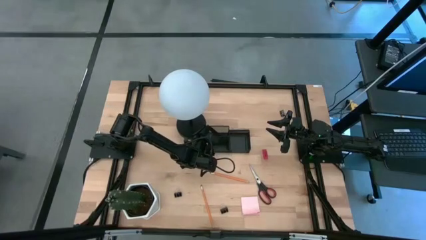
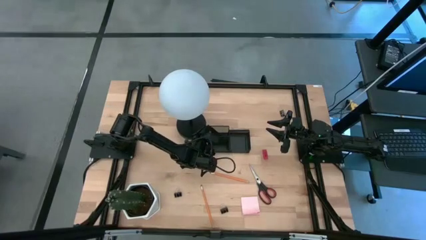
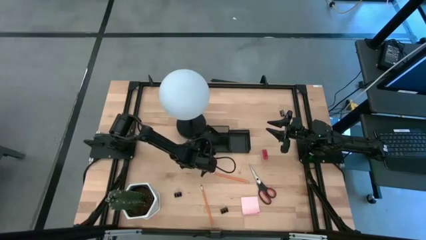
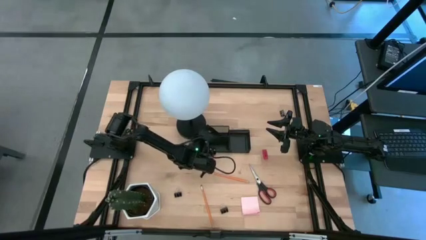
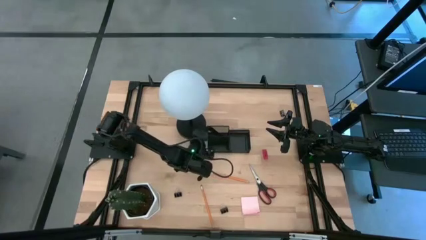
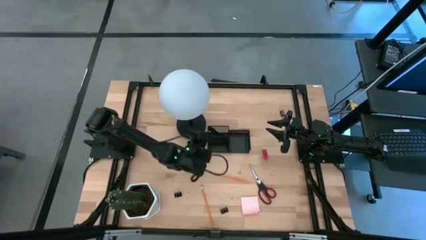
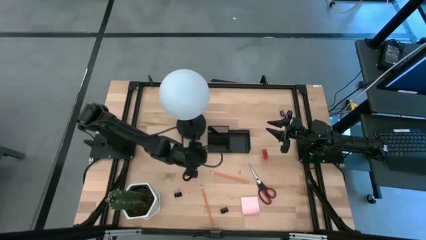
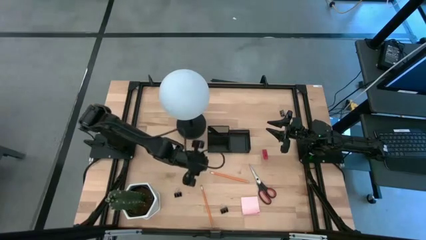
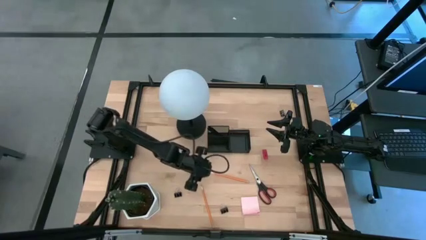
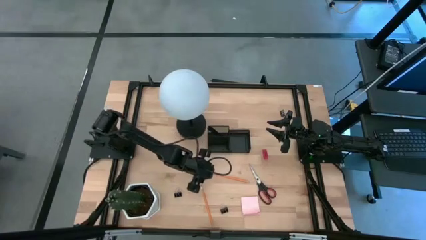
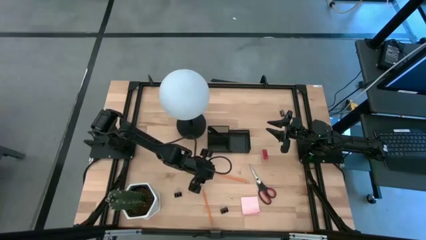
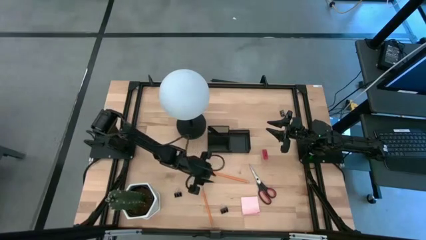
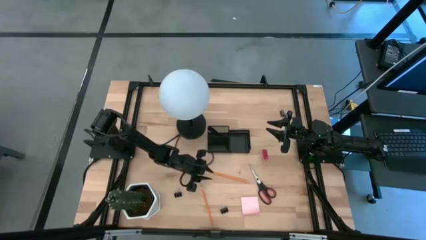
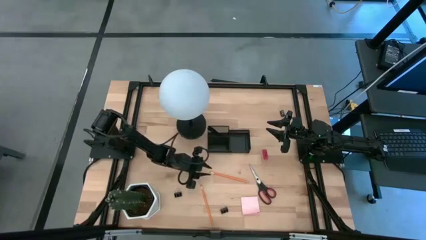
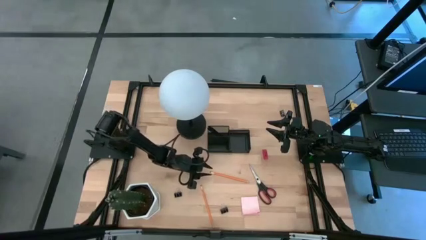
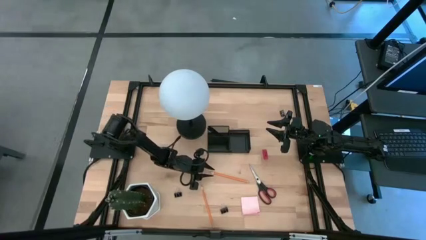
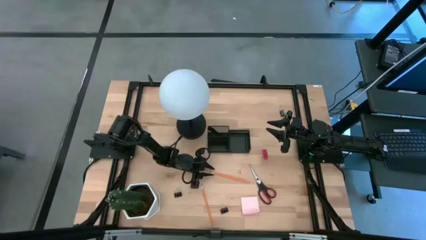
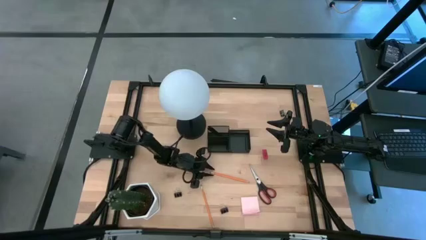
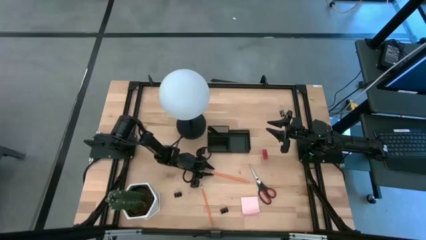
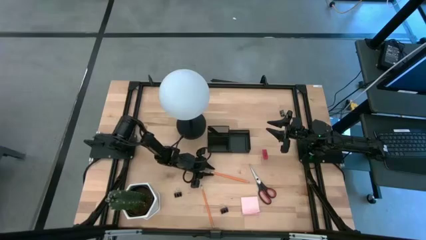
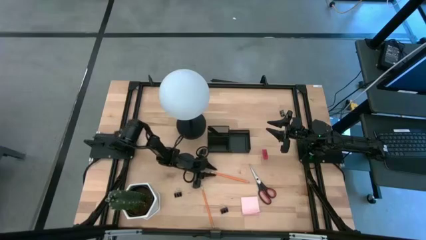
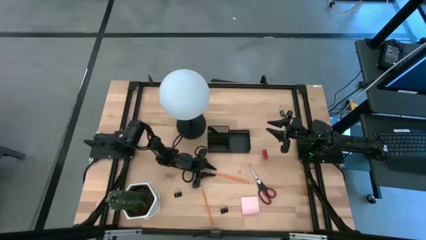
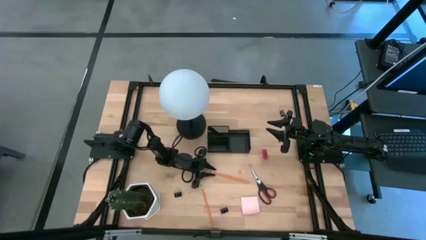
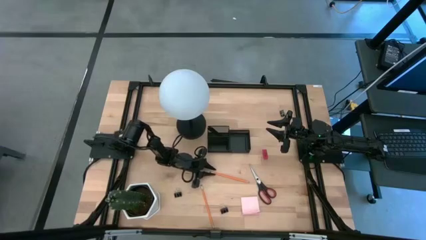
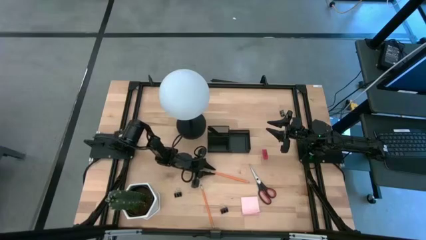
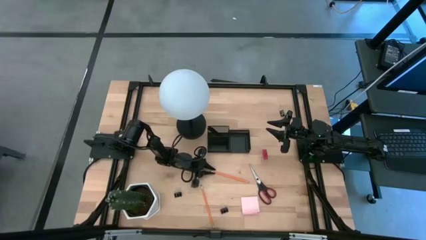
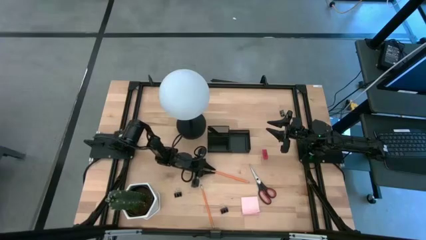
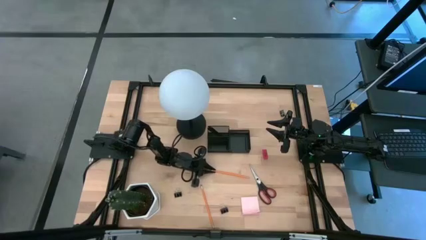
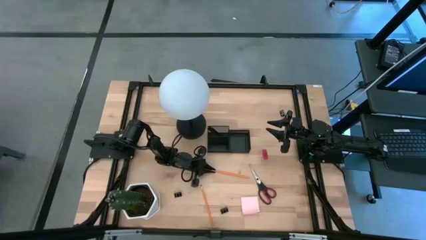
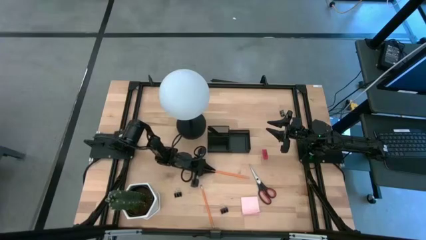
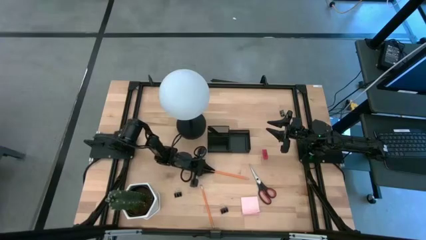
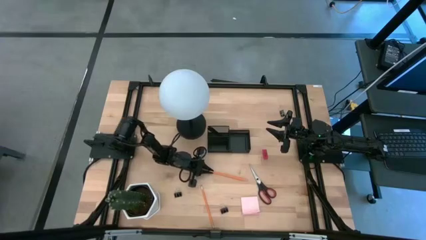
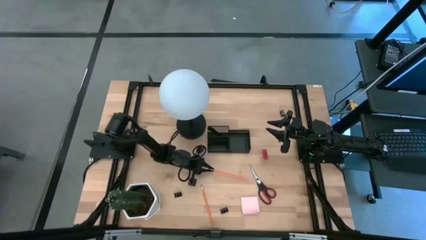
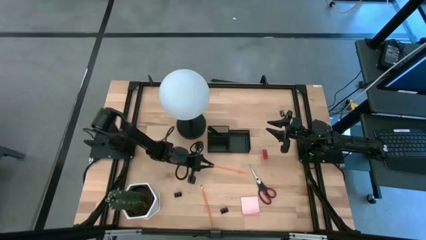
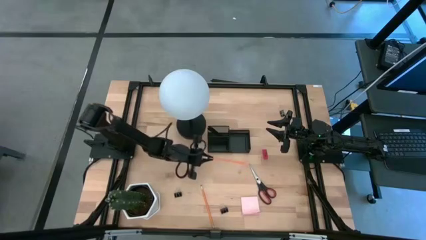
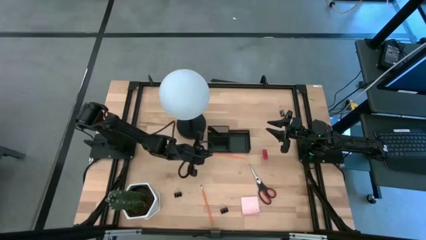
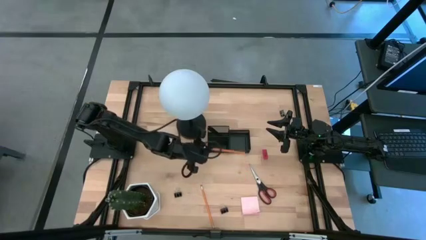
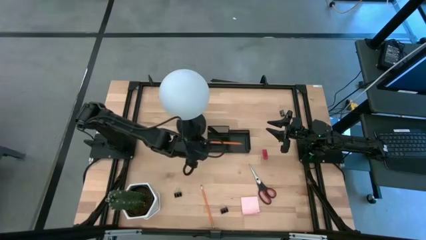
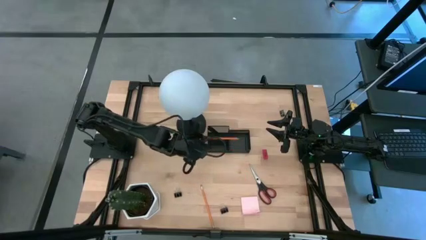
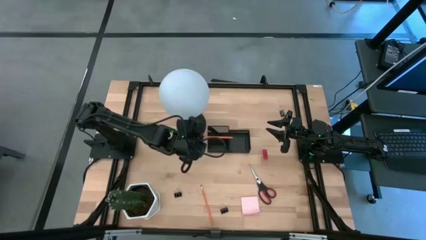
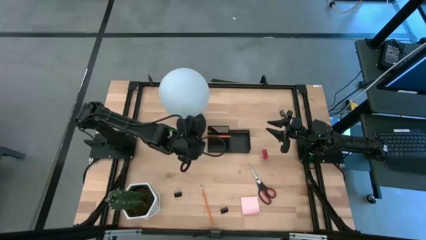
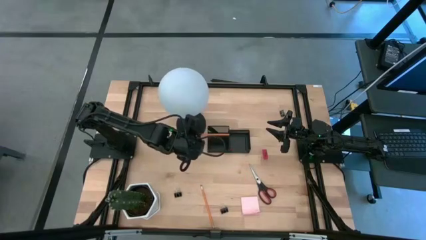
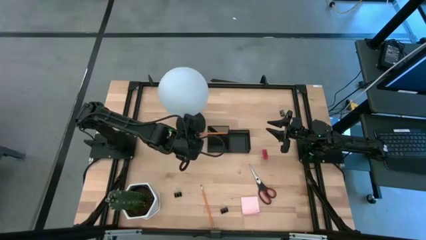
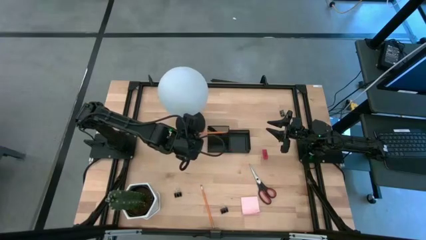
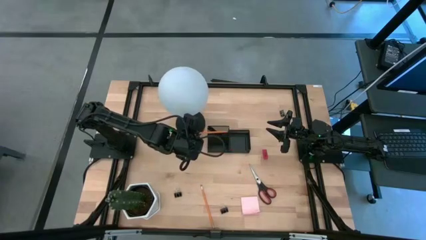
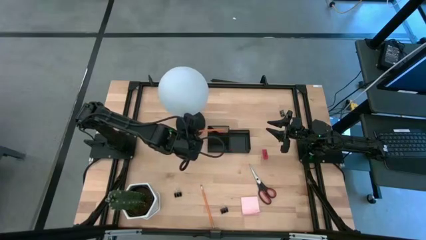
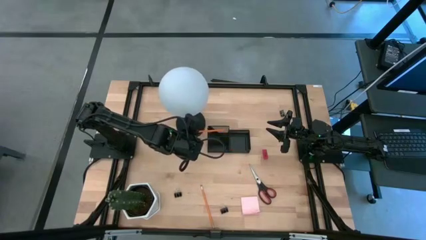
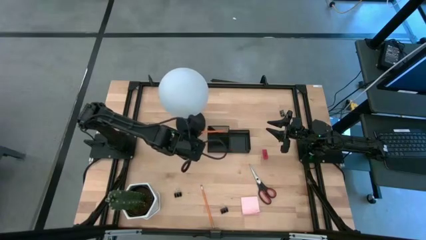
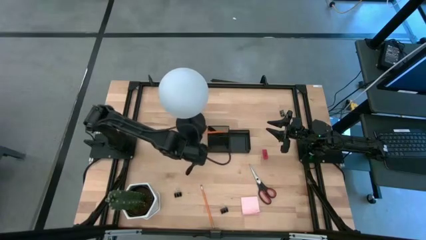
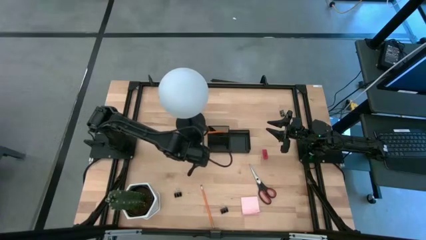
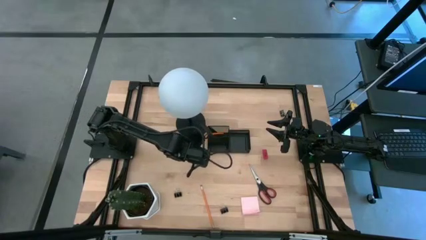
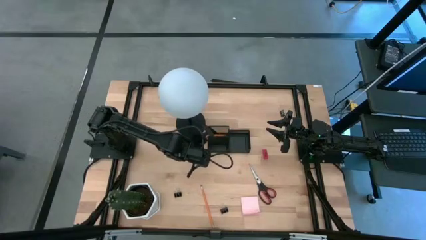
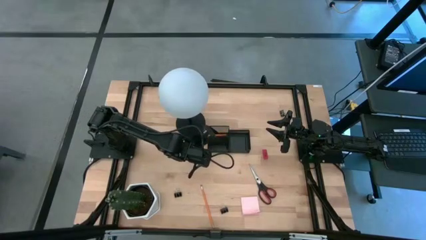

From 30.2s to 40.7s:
Task: Pick and place office supplies into organizer
Put the top orange pencil into the black desk organizer

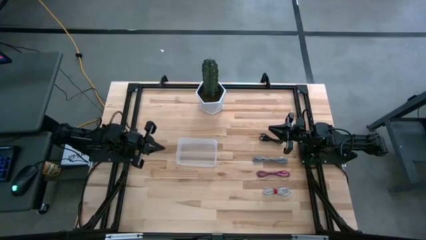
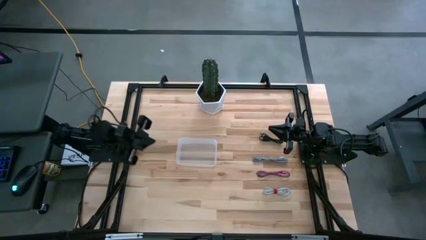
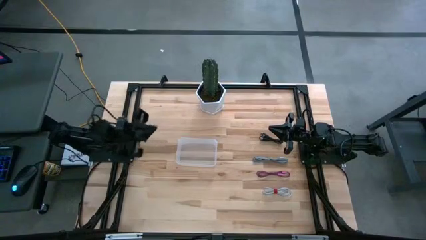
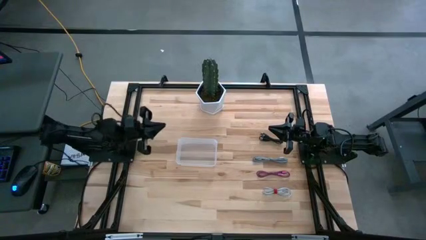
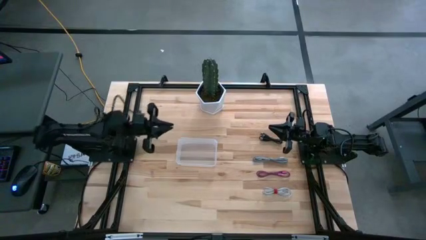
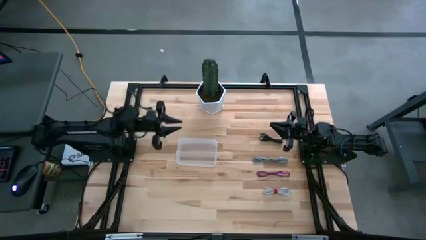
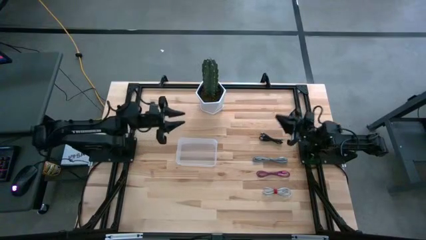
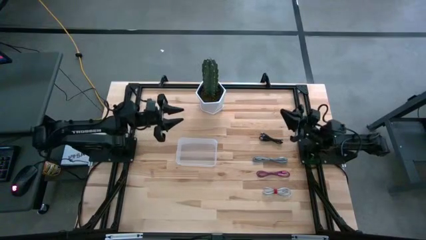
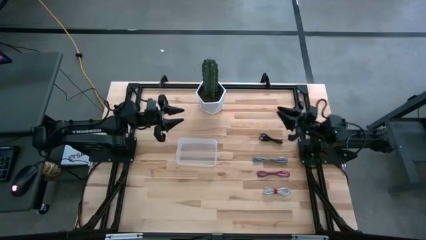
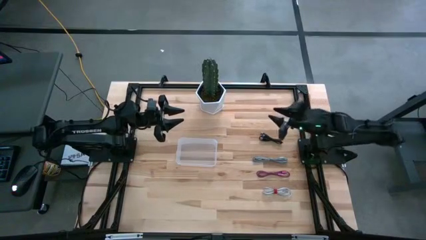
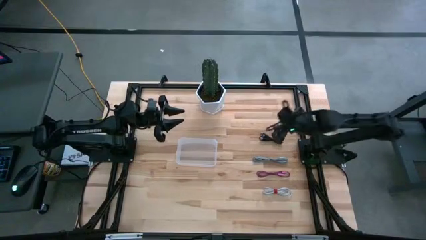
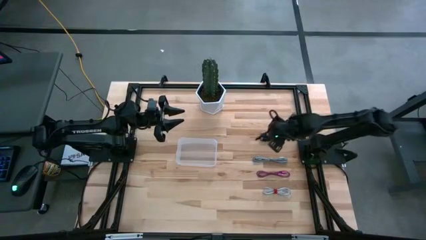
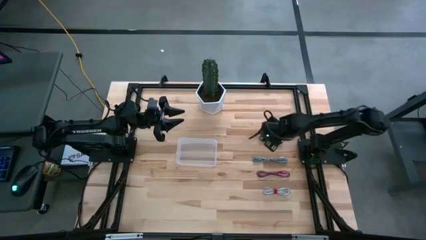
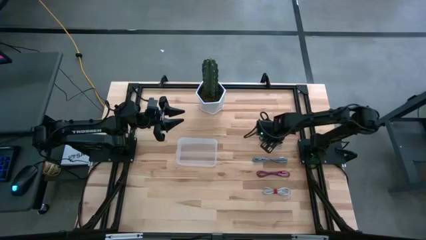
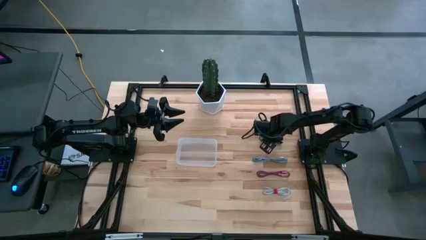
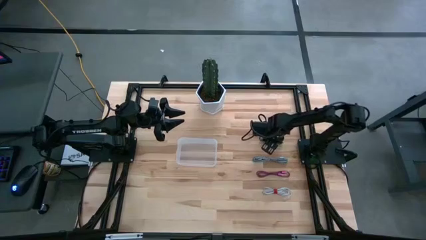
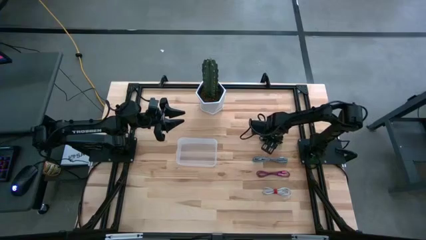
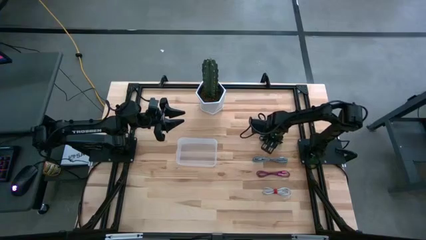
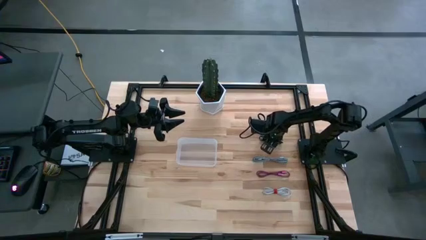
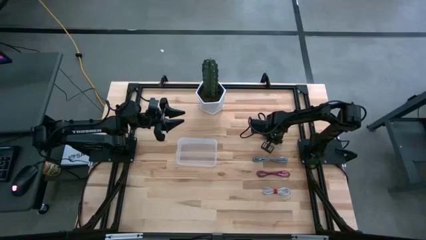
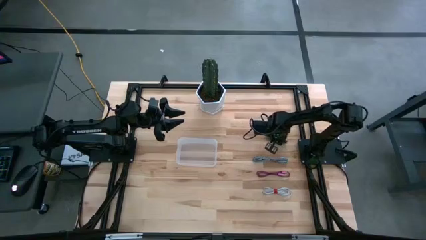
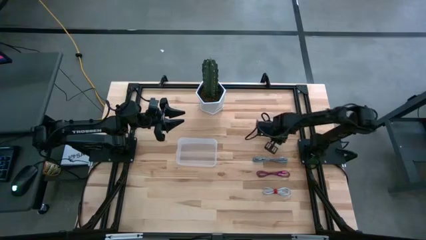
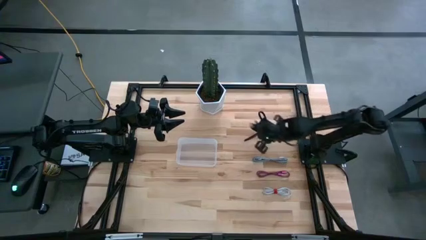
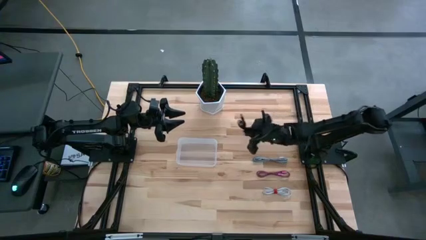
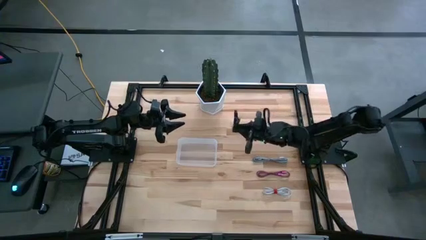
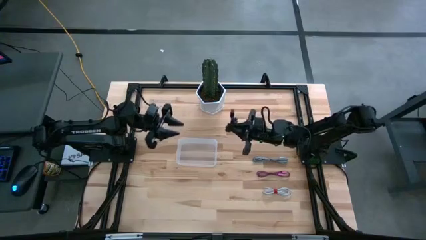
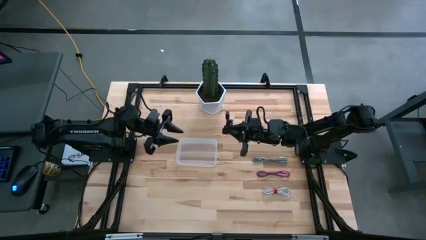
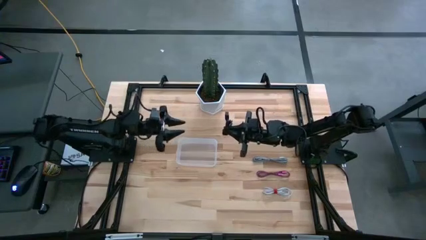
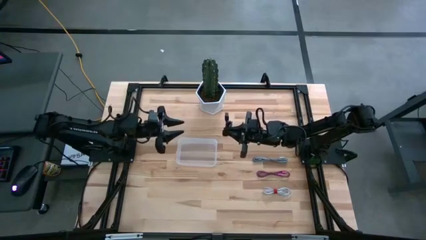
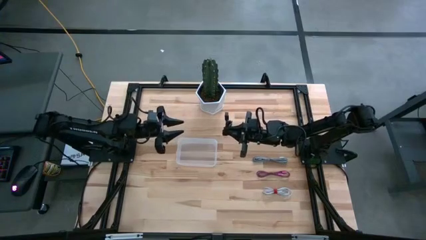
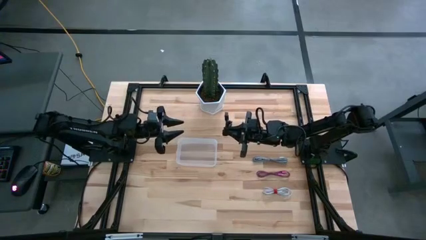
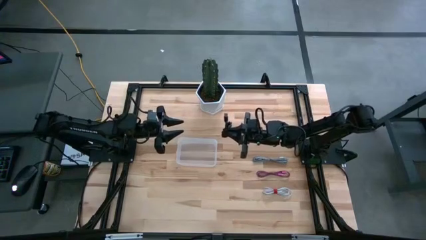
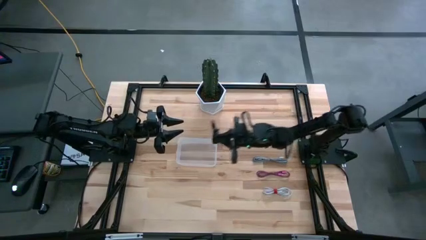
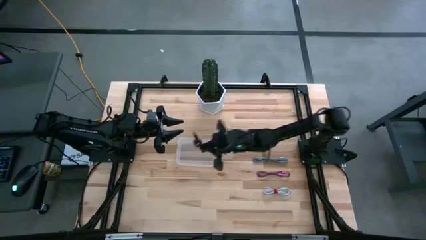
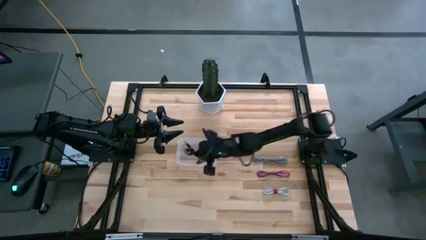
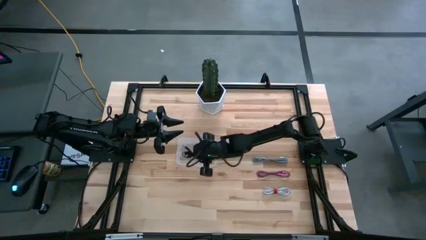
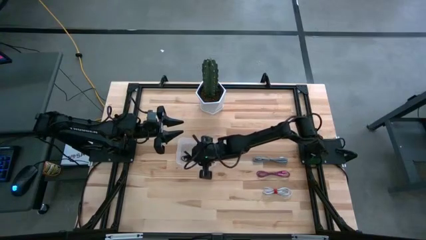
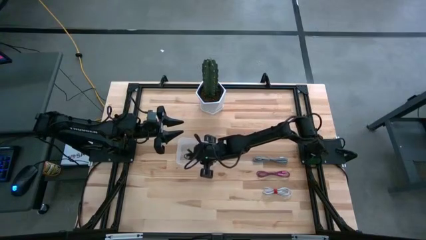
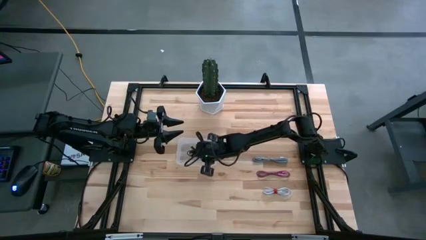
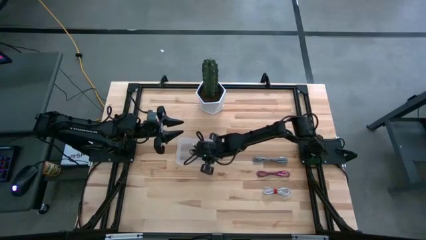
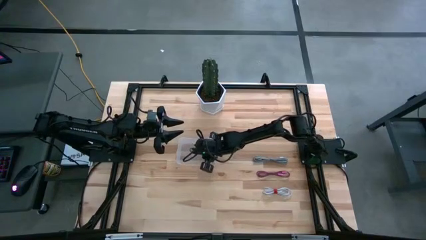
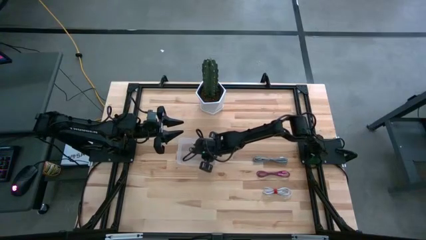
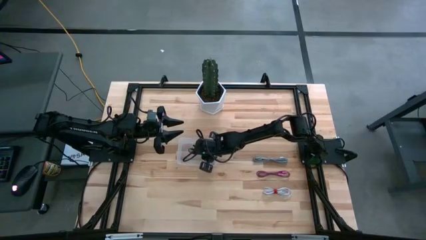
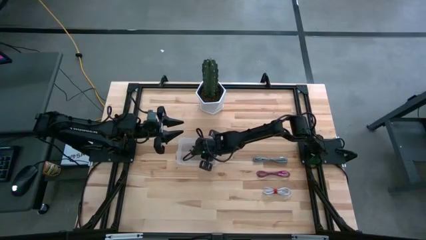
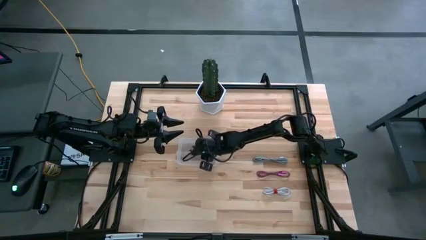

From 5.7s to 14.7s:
Task: Pick and place USB-C Cables
Put the black charger cable into the transparent bin
